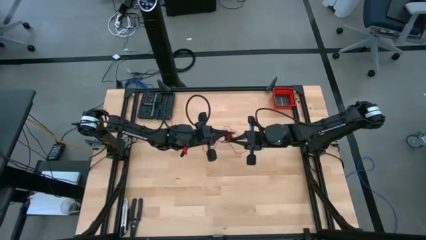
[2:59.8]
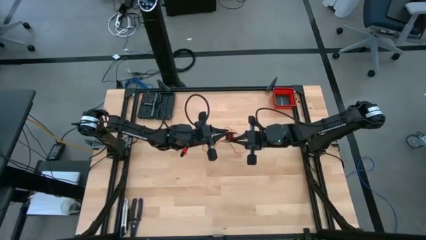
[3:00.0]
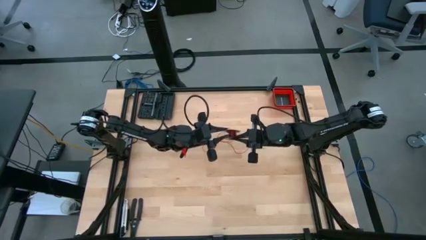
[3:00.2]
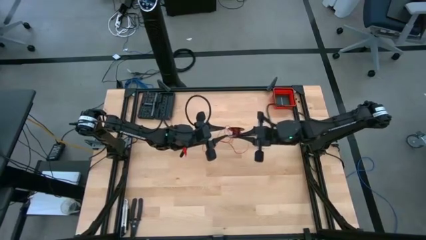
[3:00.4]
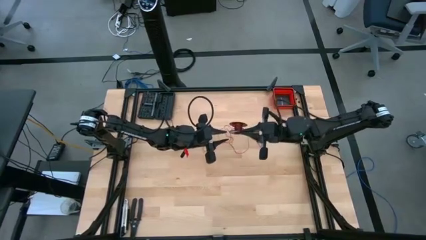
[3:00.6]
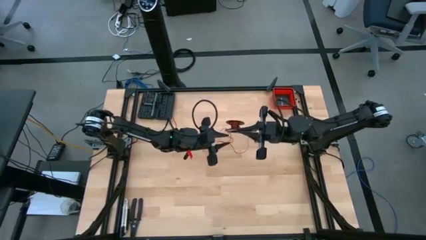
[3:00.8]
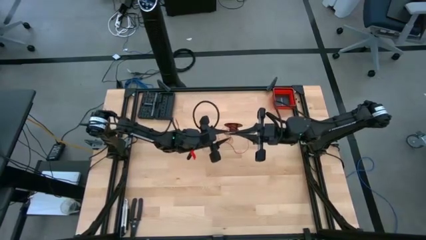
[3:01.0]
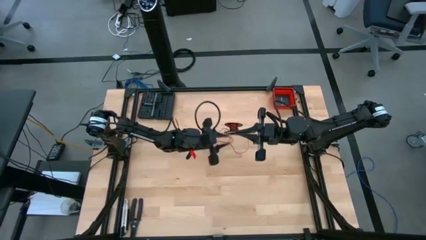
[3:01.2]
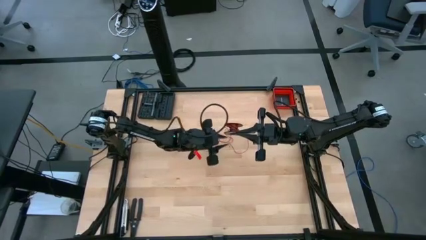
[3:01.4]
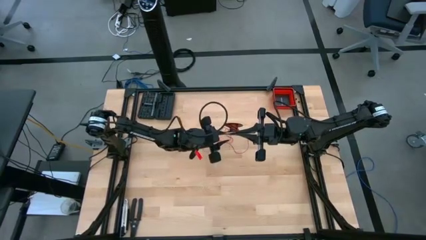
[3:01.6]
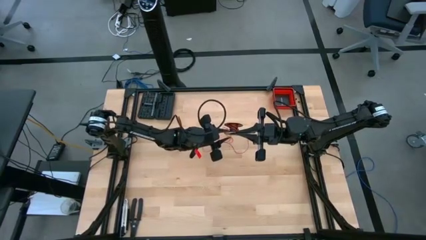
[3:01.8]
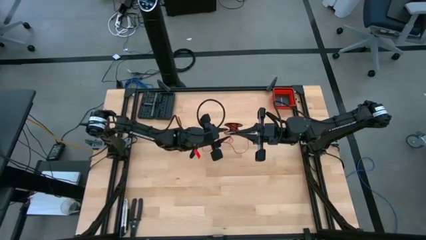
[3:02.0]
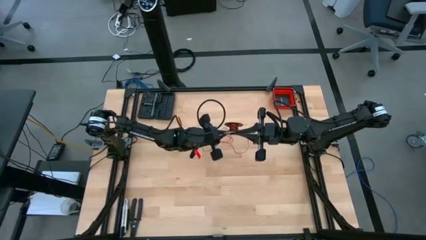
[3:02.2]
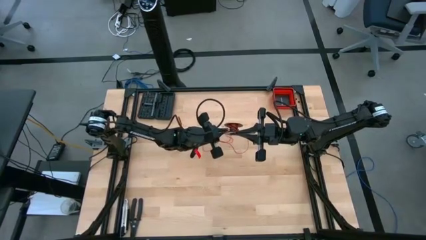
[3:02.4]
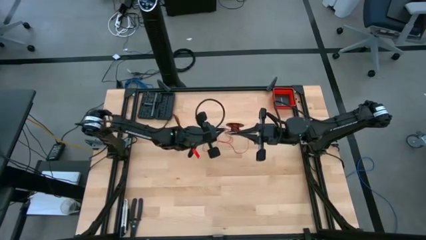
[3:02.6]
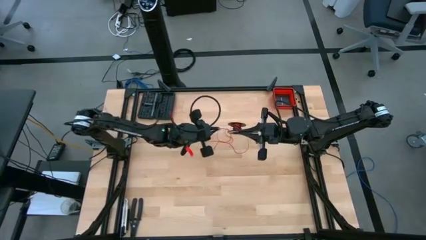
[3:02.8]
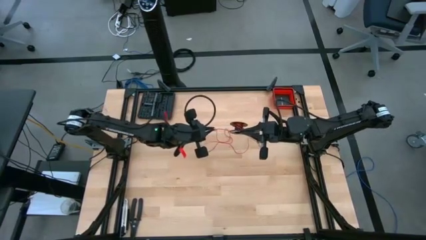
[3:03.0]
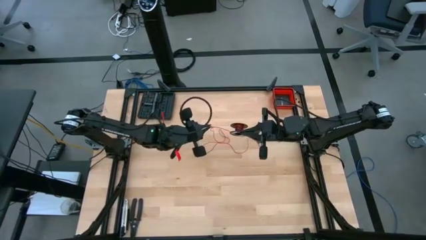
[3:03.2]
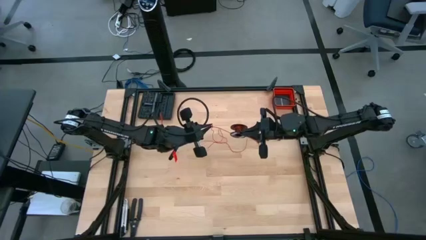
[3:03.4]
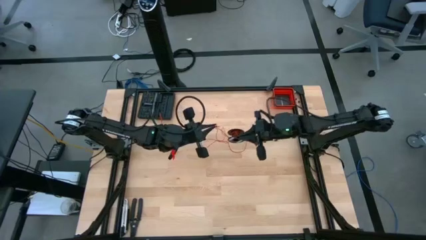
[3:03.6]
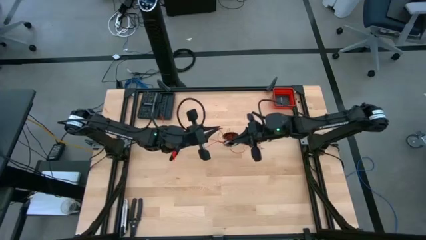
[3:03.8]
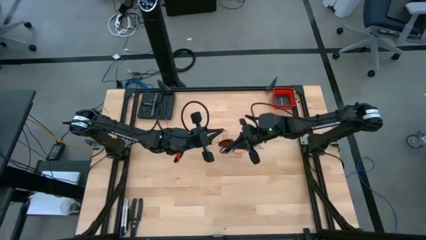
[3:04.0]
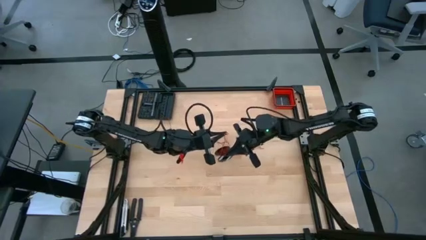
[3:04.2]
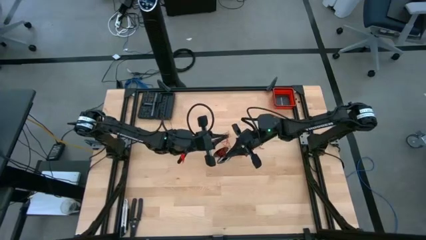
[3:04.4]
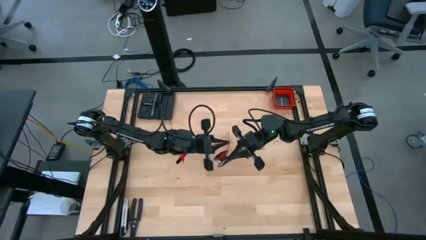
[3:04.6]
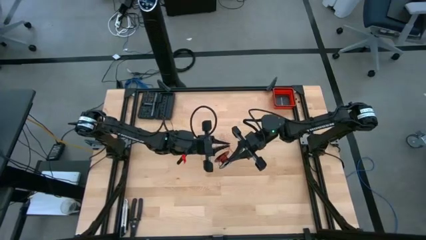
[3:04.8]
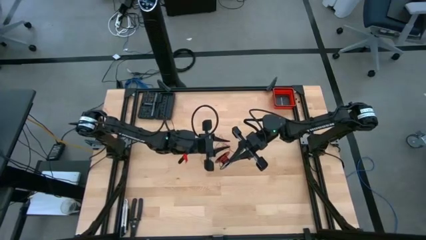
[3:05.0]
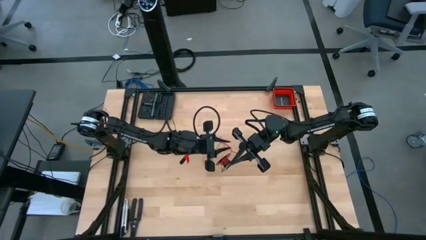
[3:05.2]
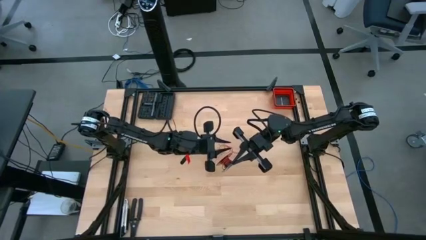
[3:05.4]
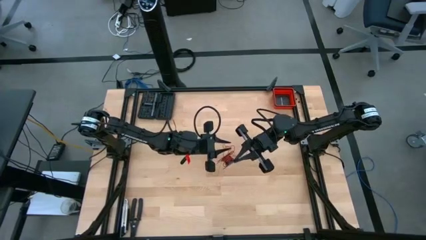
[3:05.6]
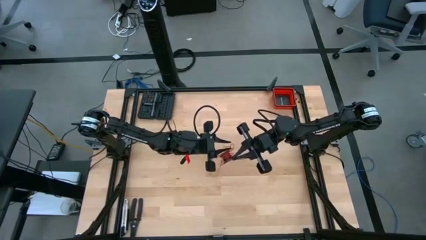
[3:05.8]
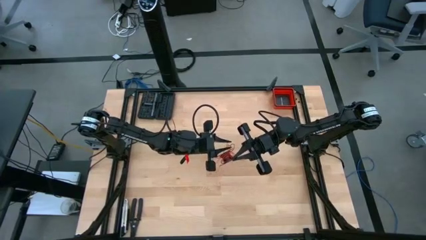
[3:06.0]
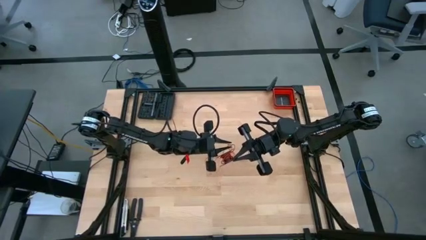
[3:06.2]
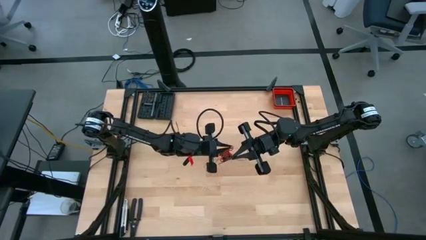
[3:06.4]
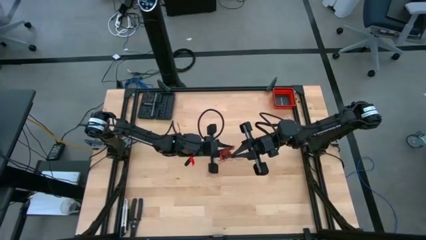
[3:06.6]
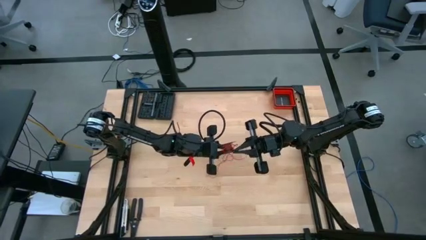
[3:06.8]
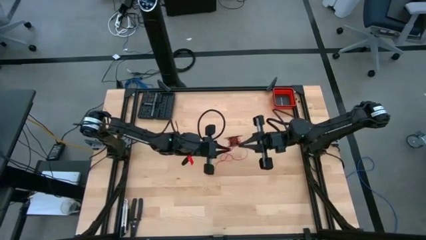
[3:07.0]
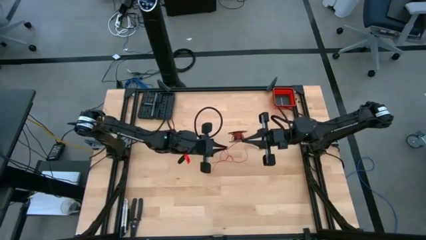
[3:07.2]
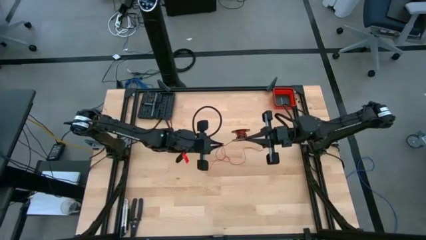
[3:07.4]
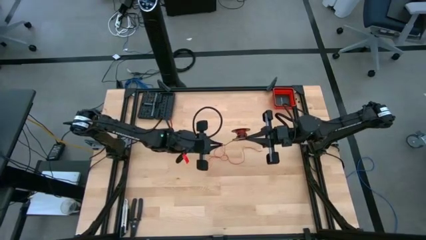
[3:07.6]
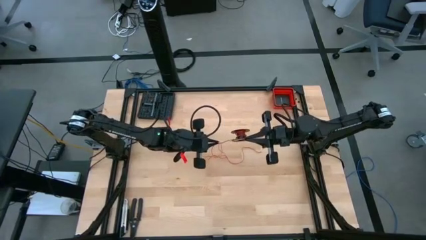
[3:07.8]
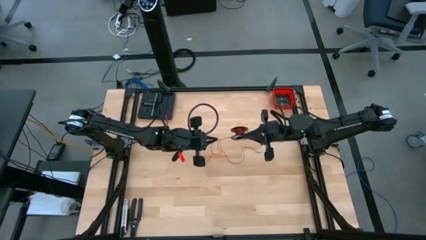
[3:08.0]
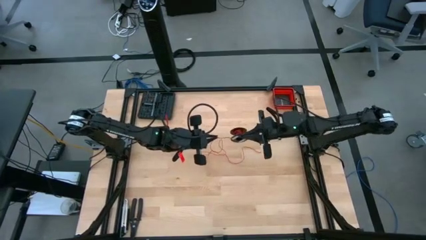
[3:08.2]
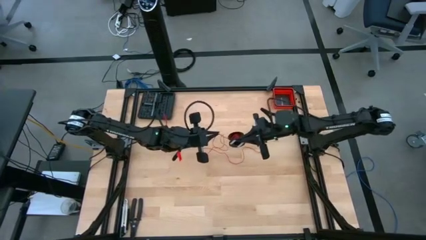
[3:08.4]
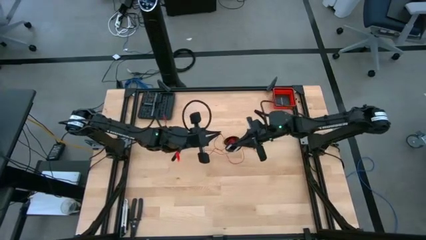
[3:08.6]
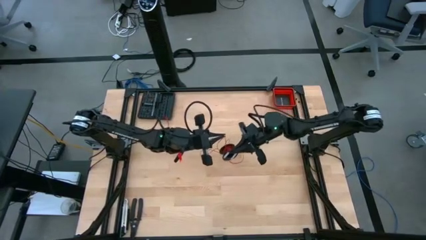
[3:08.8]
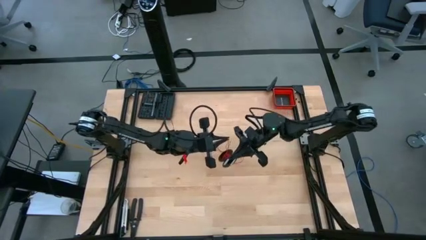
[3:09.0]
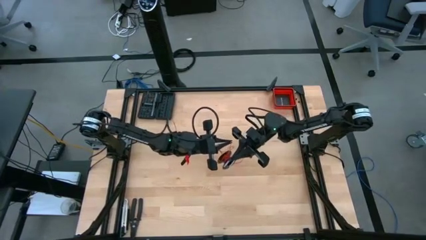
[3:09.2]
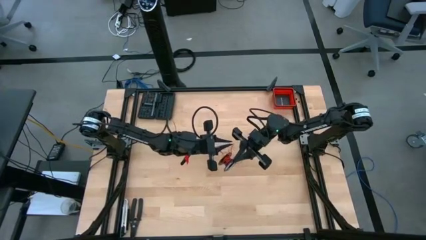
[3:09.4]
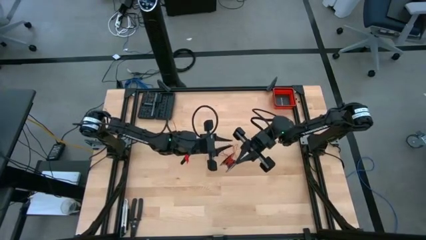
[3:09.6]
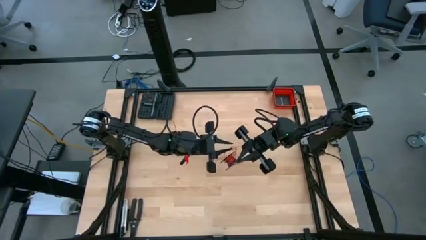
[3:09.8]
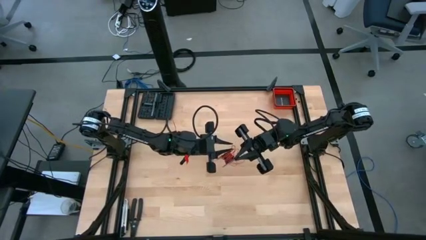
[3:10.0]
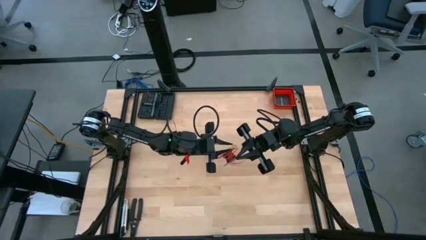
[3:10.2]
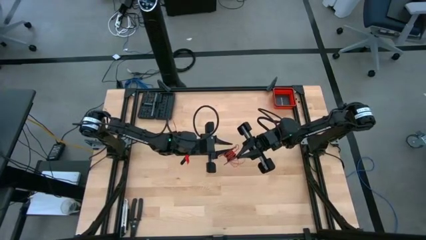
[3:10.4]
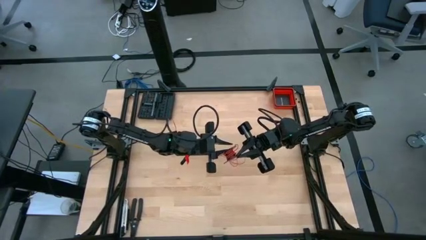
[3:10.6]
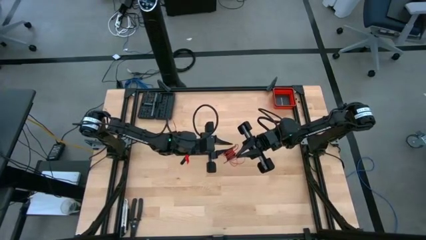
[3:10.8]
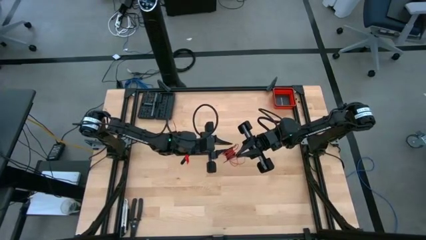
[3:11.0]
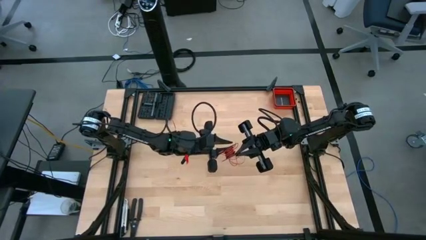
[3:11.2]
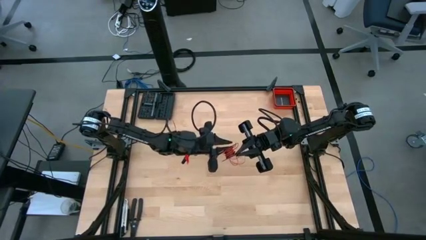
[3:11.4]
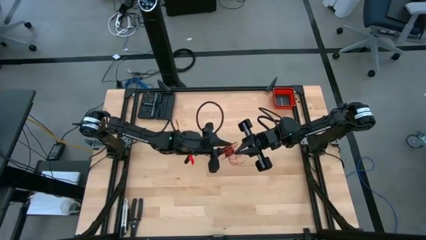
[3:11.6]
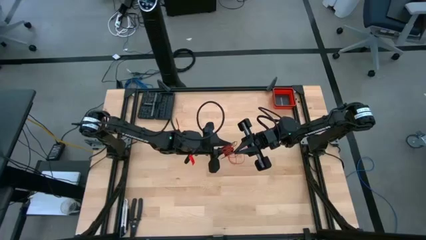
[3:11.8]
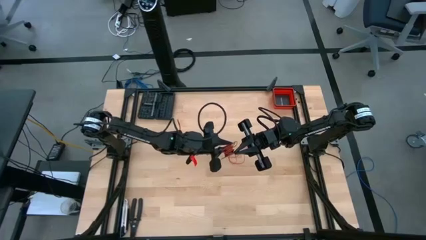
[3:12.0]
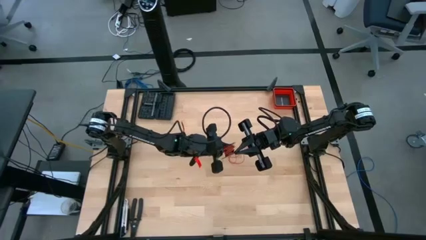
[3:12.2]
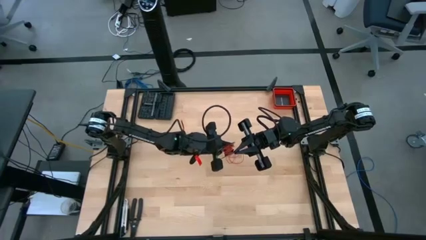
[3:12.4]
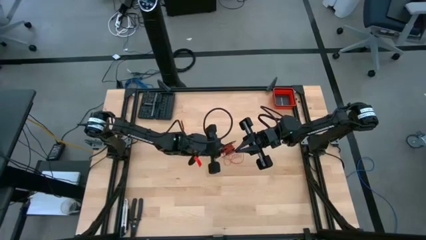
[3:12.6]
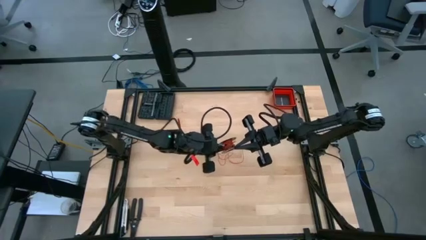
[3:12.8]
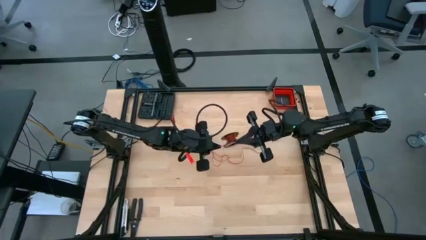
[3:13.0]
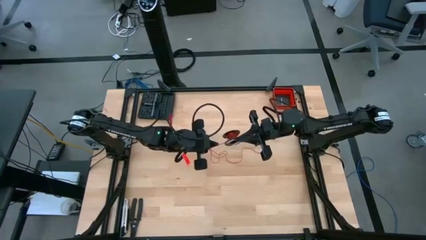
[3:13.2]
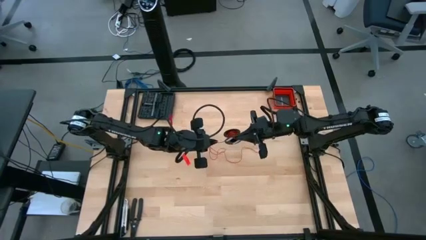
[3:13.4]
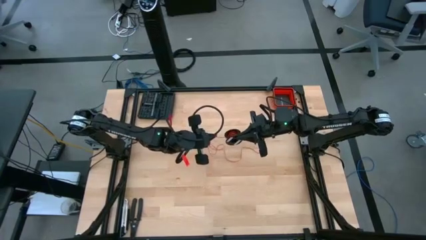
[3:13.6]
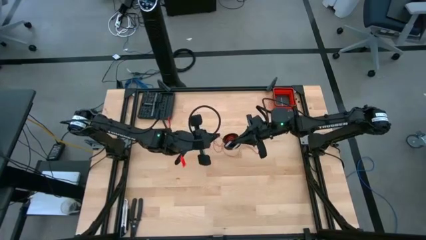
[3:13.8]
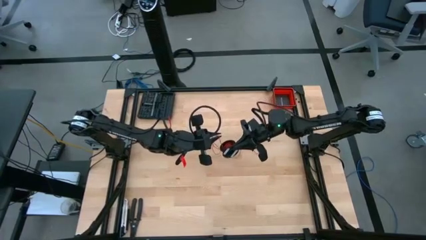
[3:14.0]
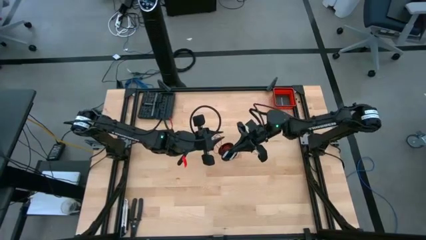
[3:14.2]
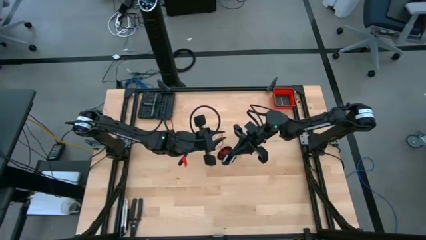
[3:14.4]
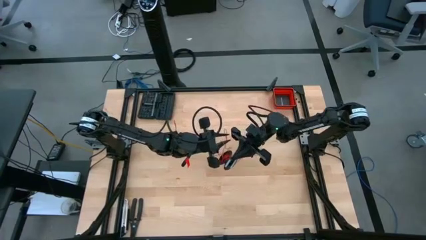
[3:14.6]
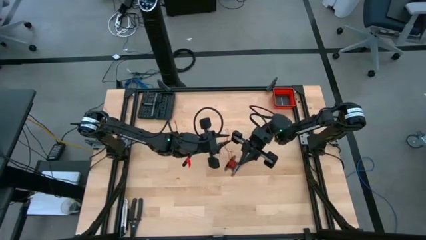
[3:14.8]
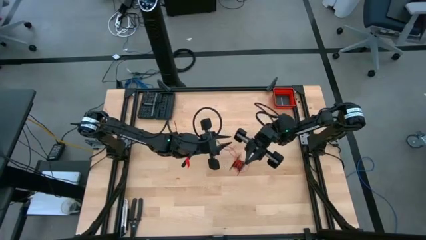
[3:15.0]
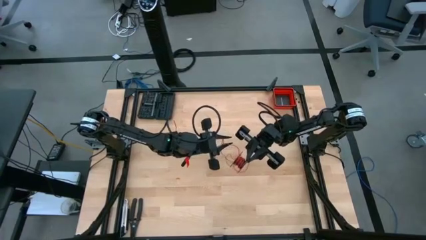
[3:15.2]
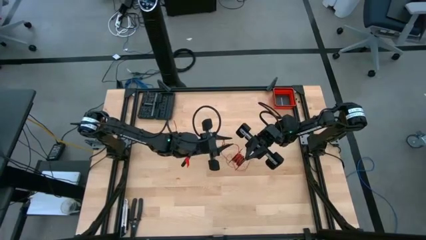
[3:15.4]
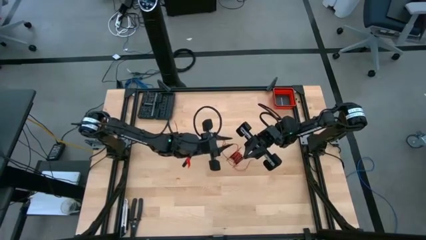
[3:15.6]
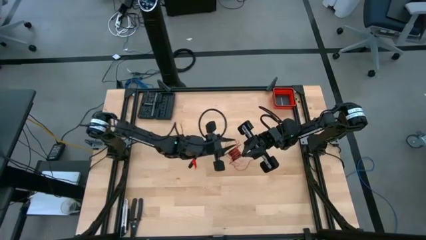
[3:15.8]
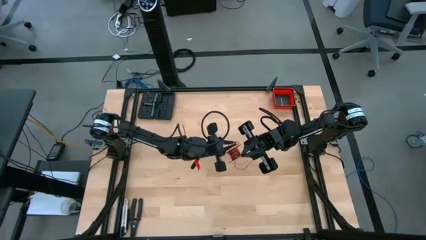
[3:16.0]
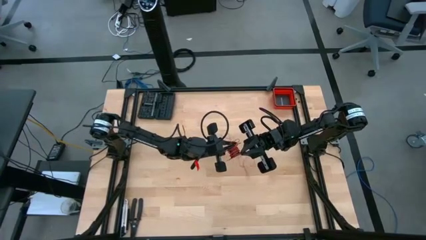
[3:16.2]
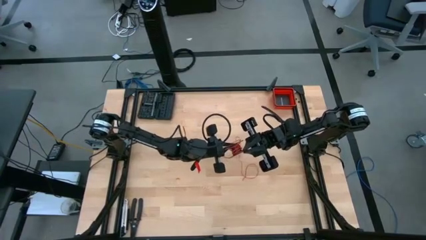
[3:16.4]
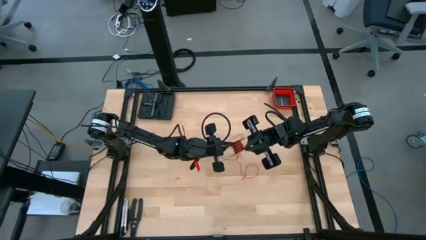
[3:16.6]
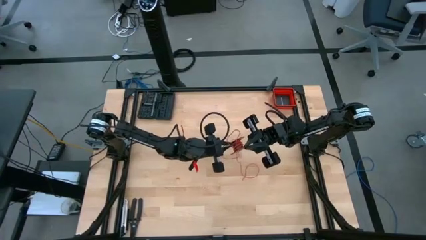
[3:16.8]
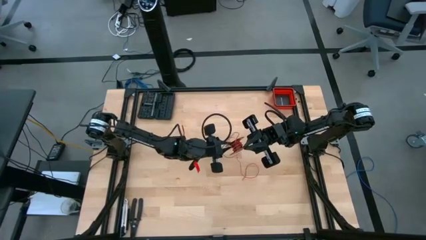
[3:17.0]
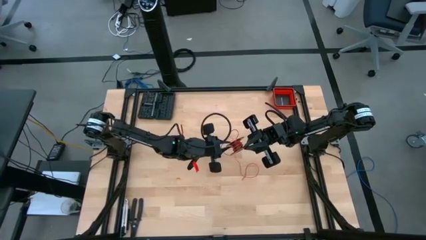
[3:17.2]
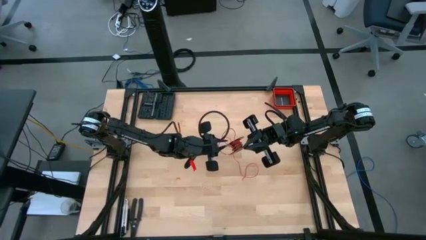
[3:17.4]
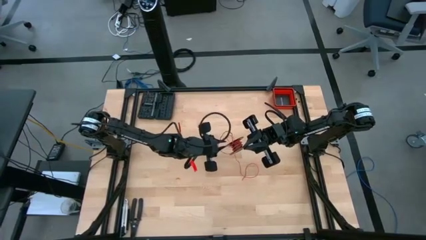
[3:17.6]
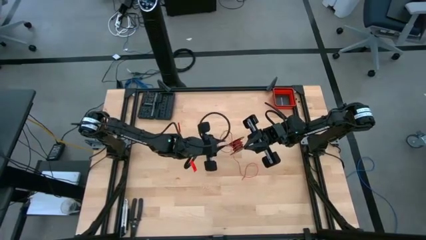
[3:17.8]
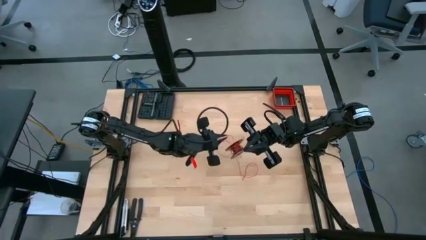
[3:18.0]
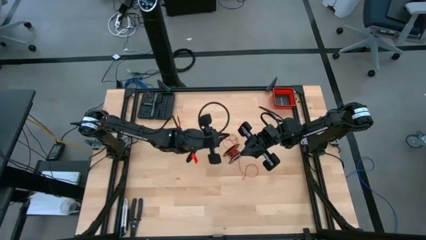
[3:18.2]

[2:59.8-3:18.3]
Task: Coil cords
Coil the red wire on the black spool
